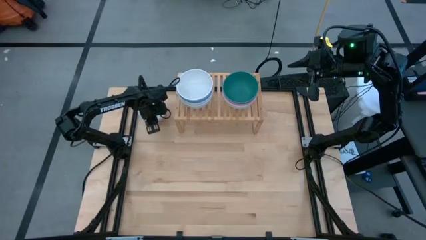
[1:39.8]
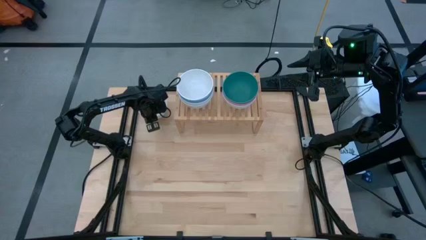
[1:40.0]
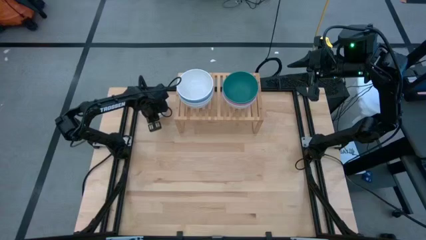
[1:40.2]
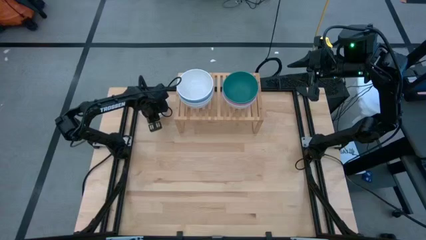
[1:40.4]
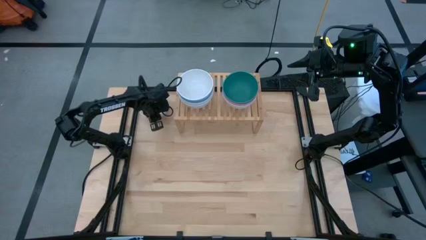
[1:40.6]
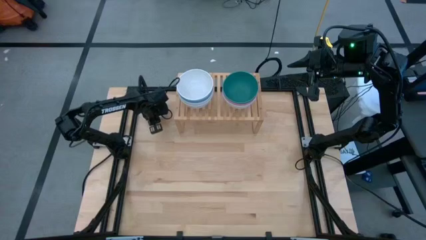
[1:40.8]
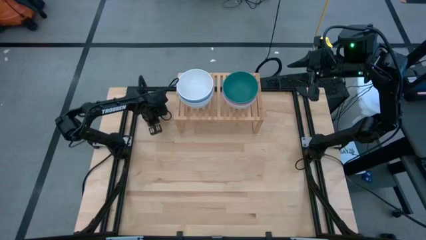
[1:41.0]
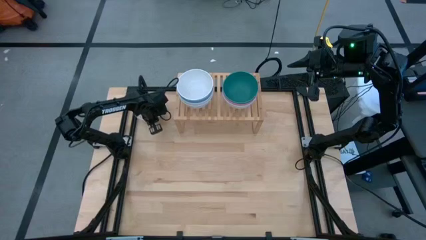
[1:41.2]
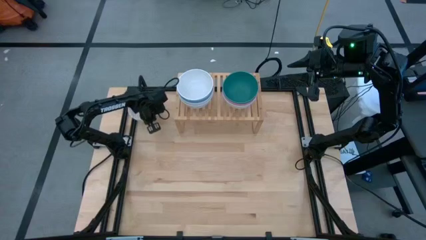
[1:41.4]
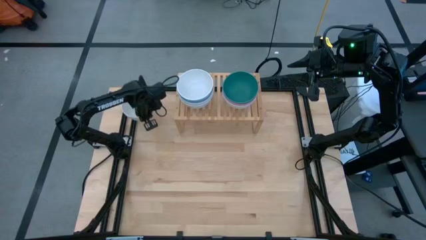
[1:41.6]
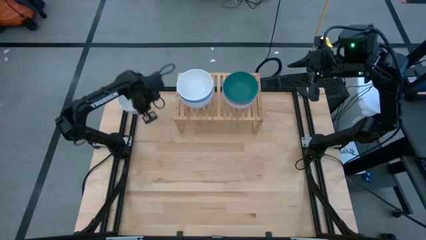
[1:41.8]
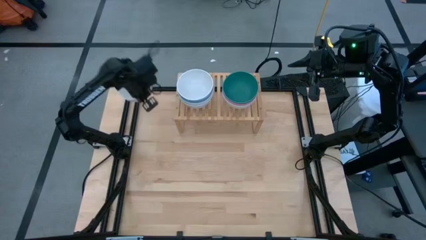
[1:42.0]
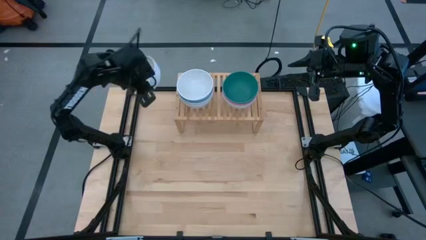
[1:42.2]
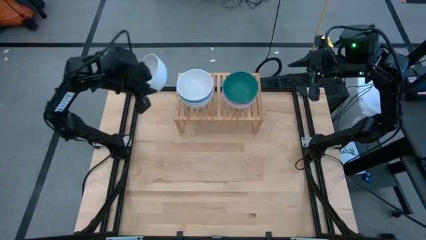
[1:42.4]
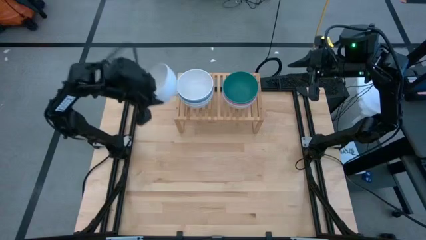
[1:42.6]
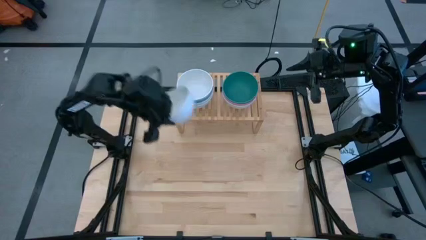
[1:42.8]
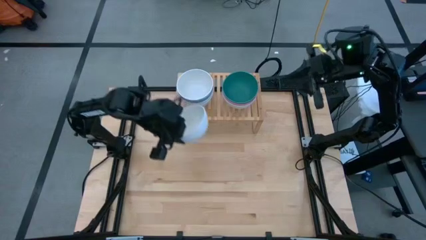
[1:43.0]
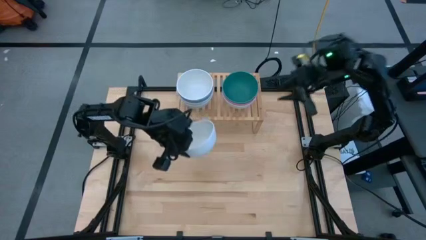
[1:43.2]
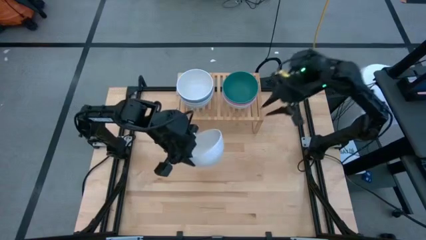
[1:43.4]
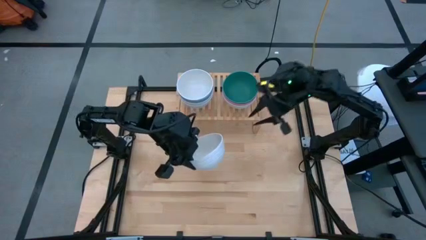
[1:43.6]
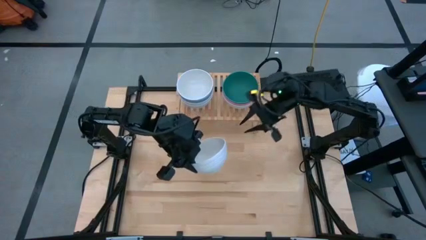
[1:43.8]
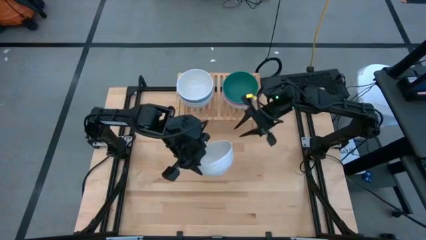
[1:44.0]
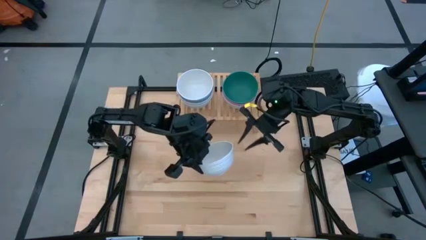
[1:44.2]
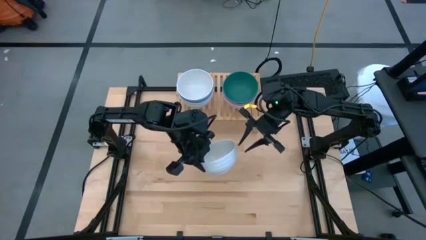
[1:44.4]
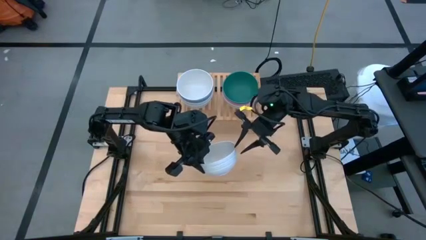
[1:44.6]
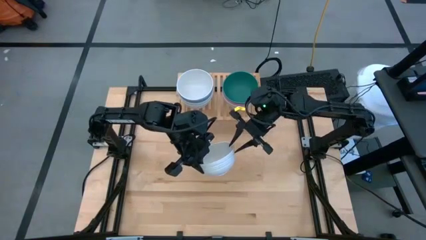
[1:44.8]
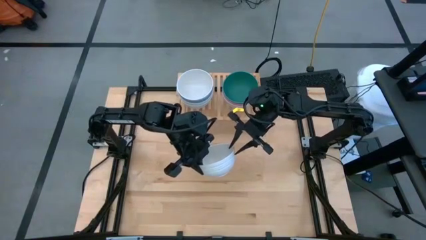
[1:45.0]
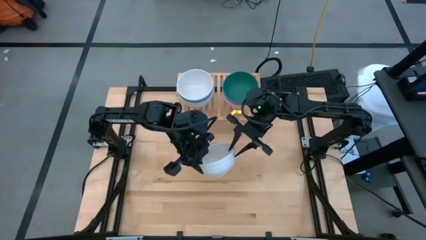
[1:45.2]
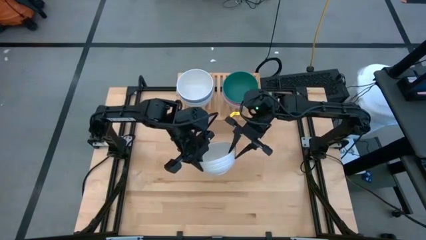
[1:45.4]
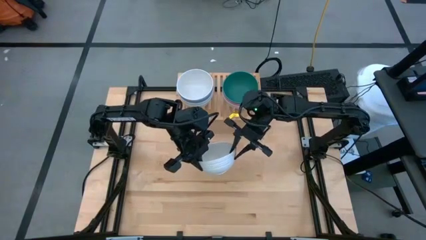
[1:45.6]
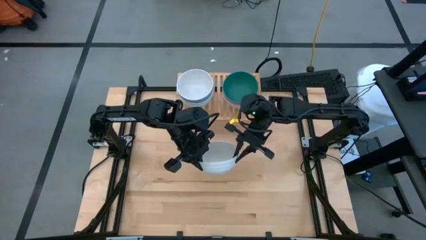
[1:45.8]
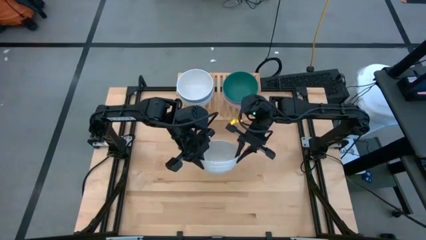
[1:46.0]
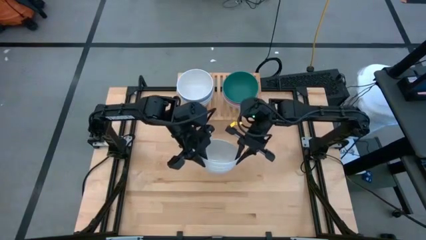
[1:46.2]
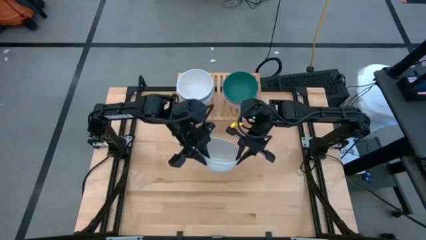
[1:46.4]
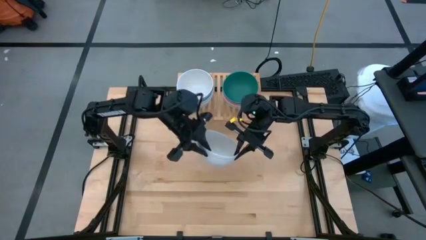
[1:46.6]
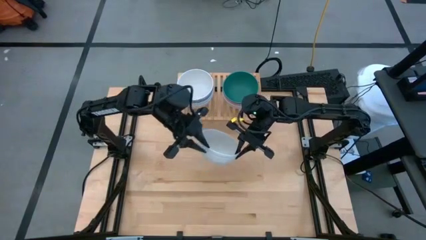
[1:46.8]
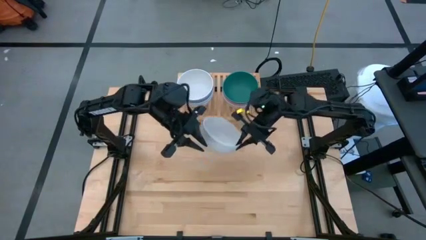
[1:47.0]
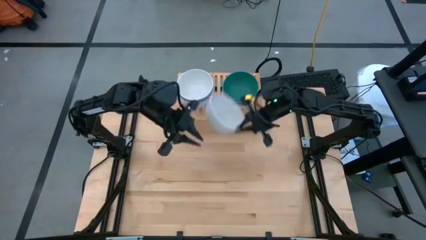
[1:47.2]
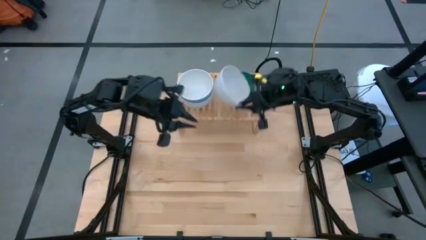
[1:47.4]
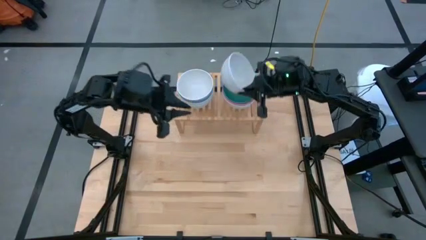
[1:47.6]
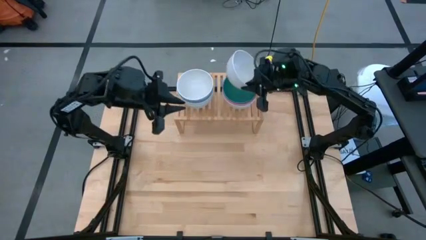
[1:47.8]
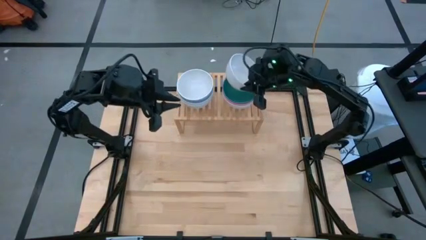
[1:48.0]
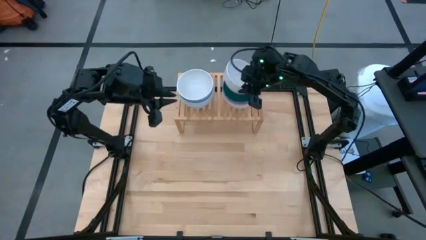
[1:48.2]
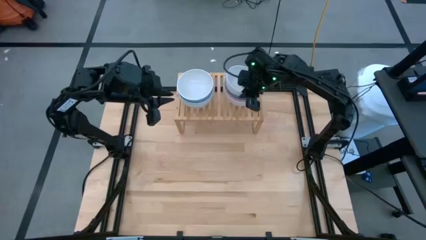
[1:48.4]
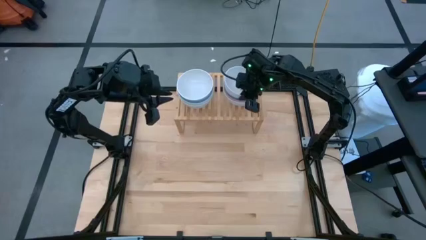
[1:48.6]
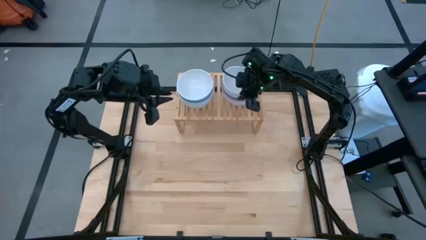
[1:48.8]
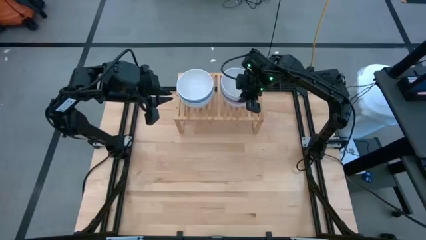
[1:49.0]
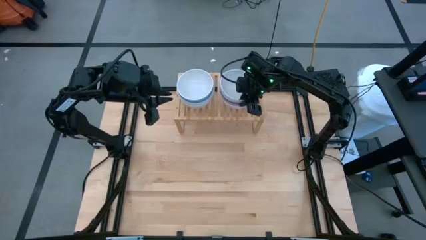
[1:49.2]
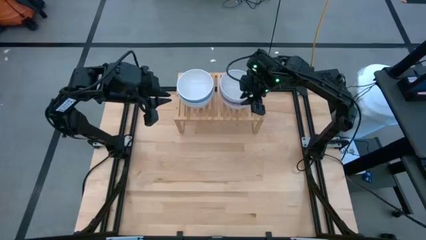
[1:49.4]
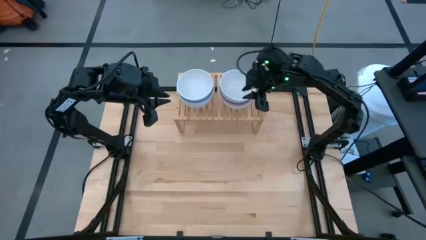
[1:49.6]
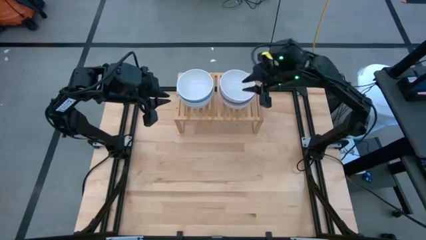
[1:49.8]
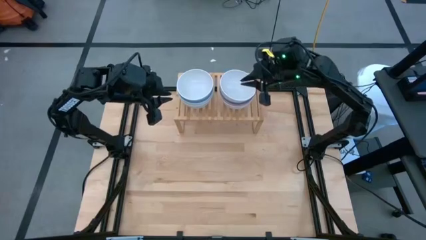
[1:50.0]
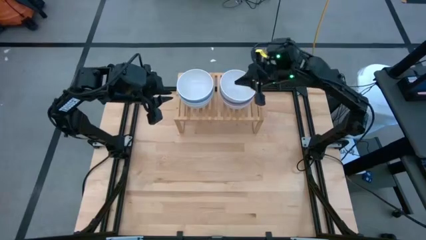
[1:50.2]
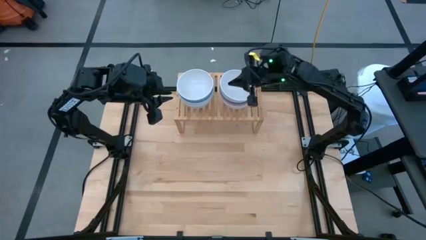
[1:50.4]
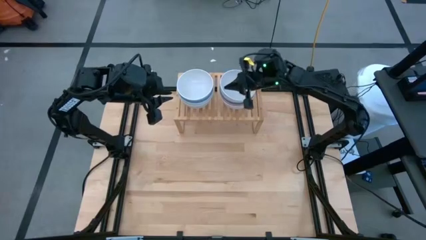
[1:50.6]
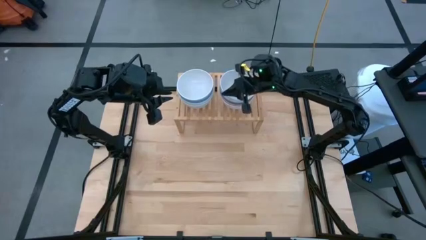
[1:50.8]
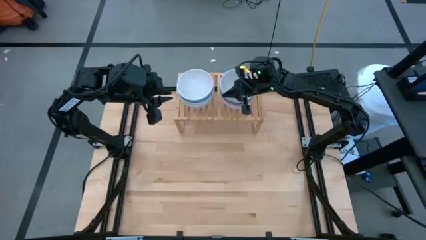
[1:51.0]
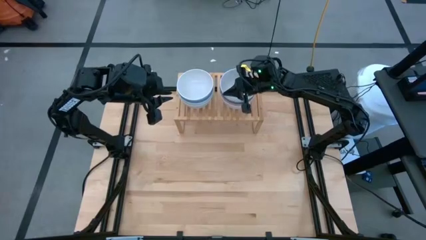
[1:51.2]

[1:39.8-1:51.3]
Task: Place and stack bowls onto a shelf
Stack the white bowl on top of the green bowl on the shelf
